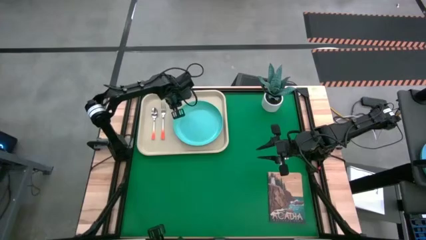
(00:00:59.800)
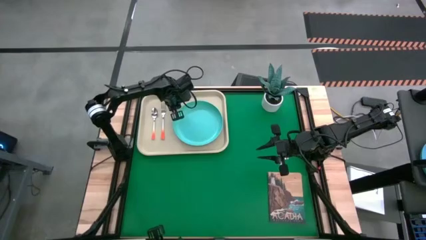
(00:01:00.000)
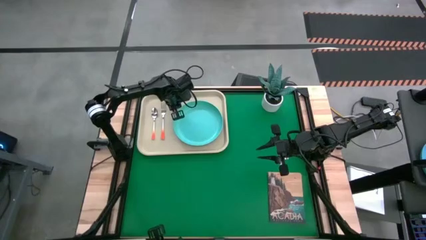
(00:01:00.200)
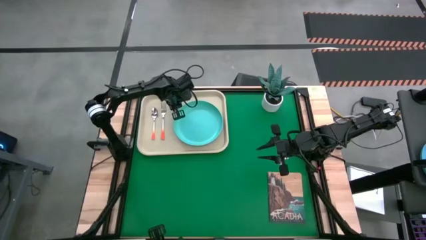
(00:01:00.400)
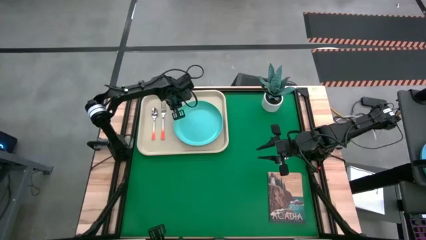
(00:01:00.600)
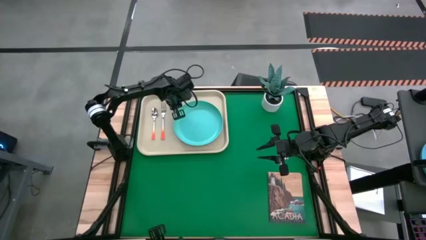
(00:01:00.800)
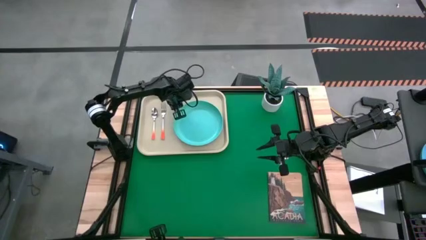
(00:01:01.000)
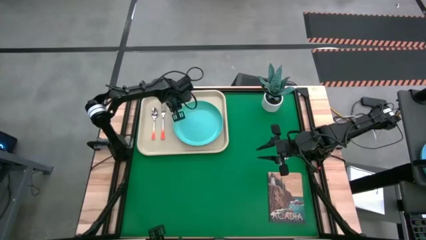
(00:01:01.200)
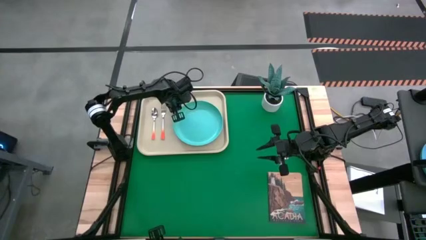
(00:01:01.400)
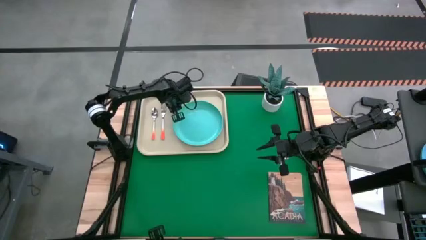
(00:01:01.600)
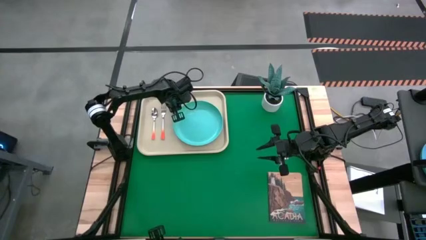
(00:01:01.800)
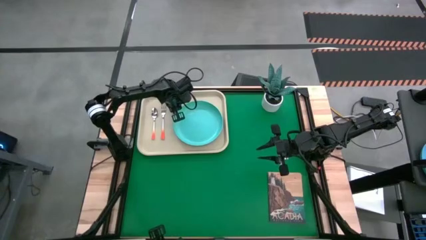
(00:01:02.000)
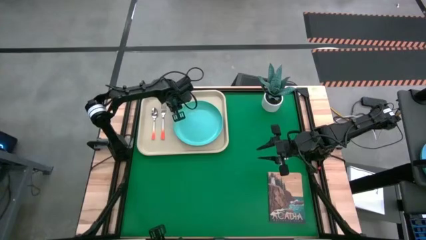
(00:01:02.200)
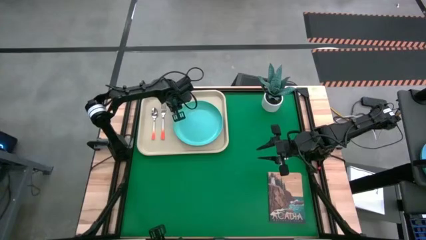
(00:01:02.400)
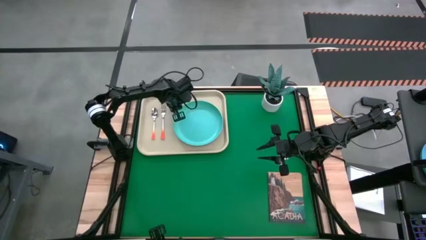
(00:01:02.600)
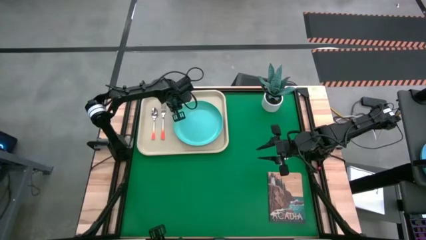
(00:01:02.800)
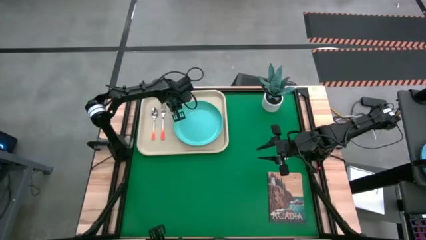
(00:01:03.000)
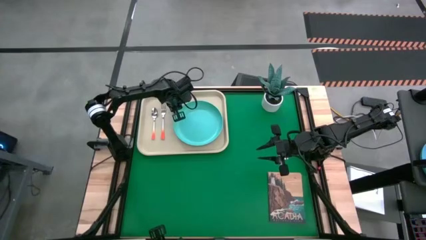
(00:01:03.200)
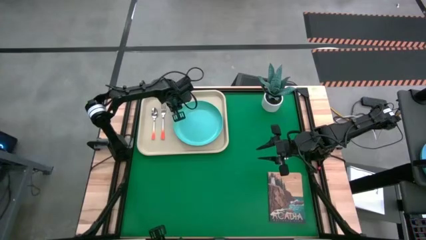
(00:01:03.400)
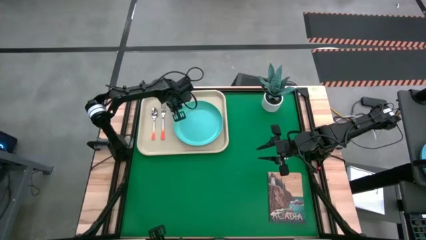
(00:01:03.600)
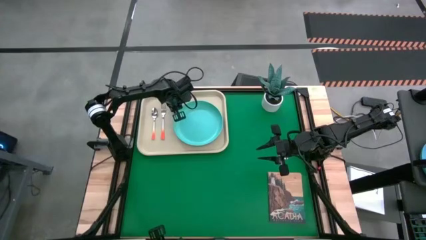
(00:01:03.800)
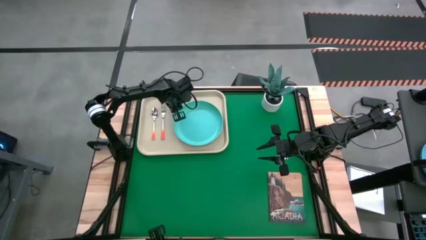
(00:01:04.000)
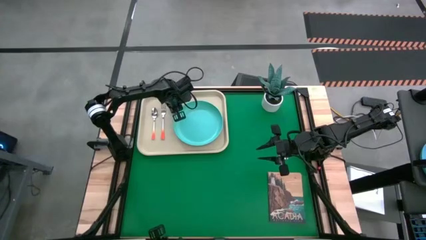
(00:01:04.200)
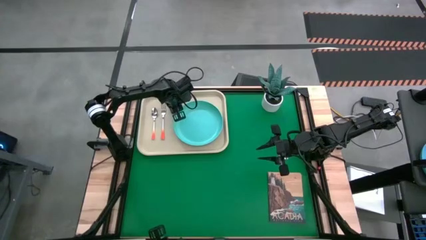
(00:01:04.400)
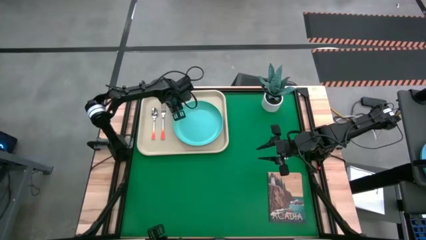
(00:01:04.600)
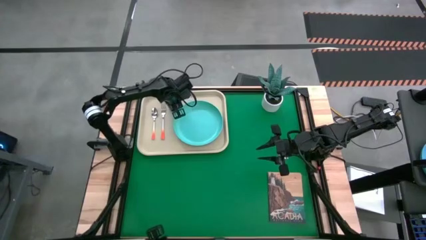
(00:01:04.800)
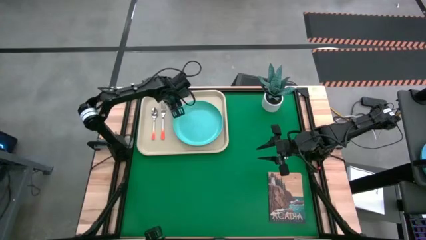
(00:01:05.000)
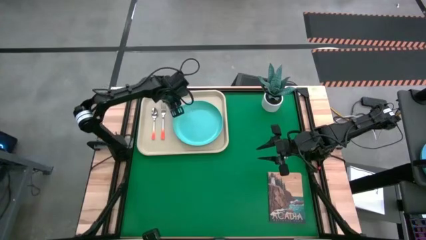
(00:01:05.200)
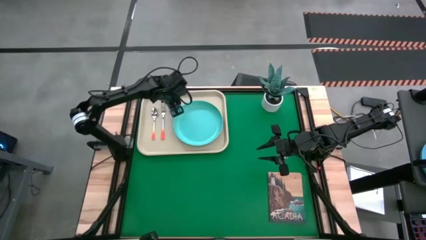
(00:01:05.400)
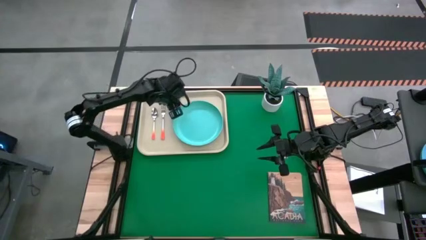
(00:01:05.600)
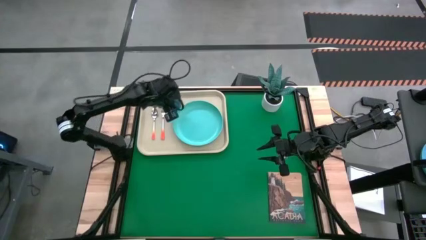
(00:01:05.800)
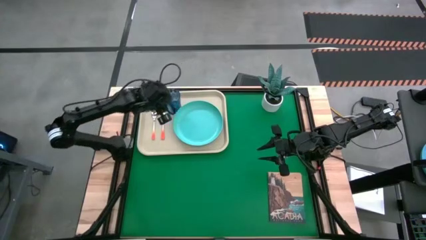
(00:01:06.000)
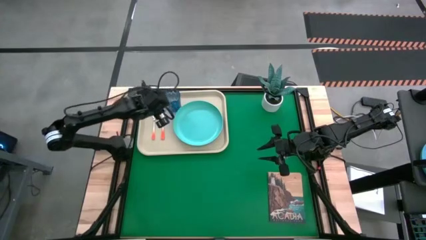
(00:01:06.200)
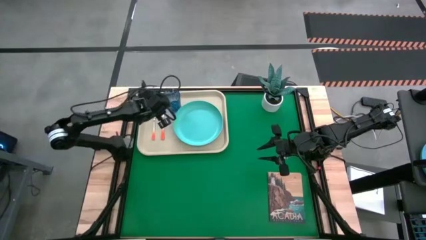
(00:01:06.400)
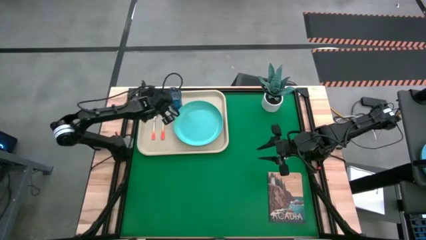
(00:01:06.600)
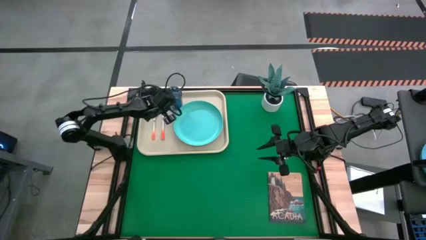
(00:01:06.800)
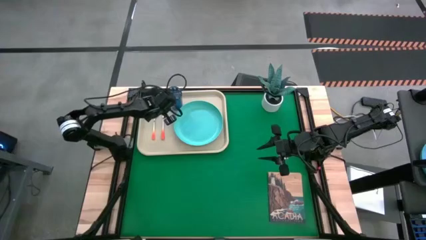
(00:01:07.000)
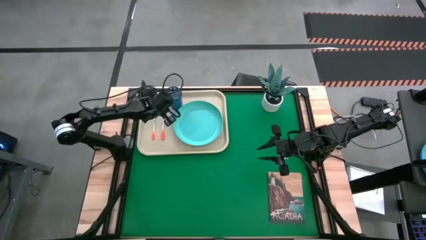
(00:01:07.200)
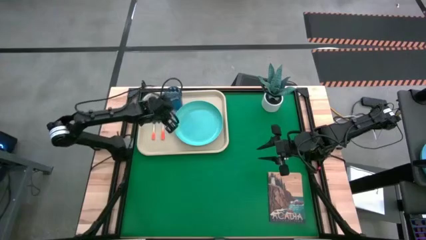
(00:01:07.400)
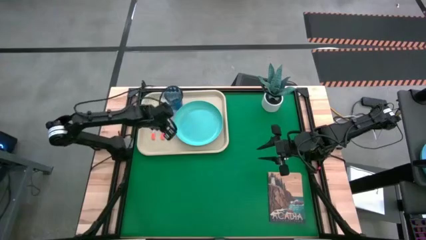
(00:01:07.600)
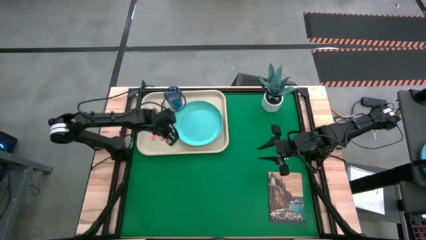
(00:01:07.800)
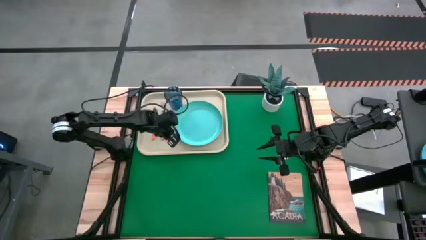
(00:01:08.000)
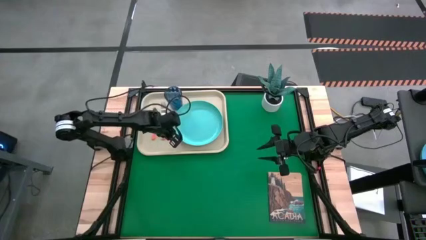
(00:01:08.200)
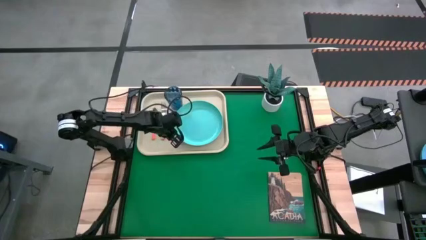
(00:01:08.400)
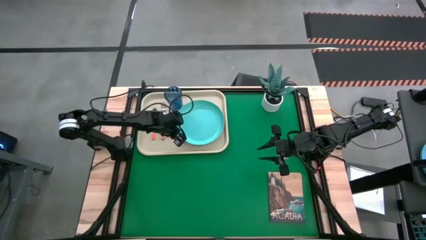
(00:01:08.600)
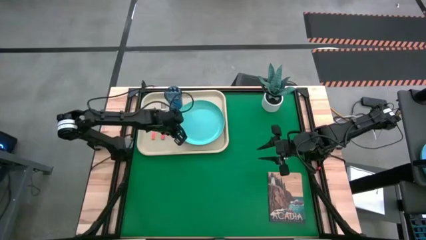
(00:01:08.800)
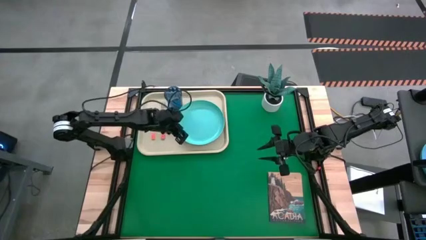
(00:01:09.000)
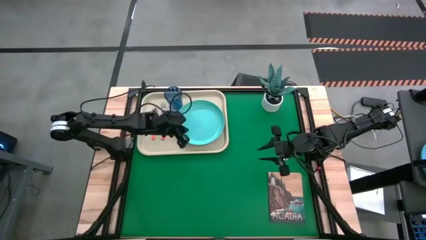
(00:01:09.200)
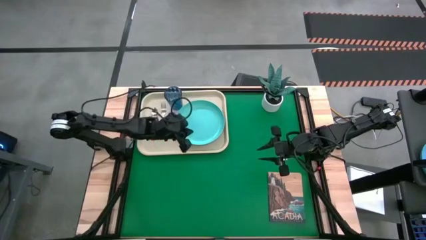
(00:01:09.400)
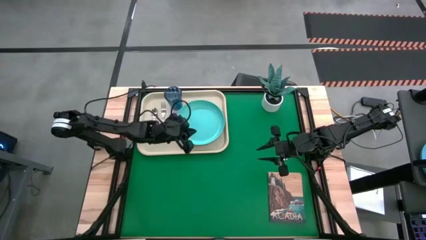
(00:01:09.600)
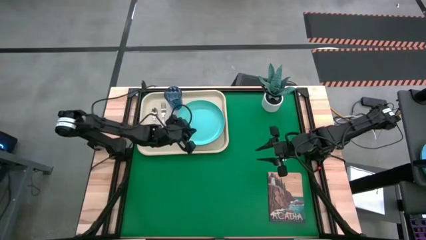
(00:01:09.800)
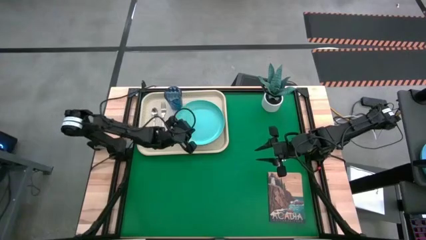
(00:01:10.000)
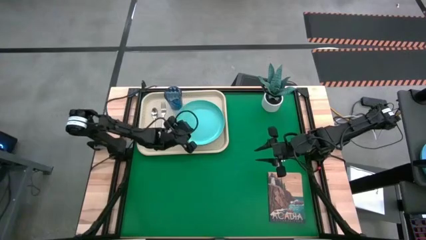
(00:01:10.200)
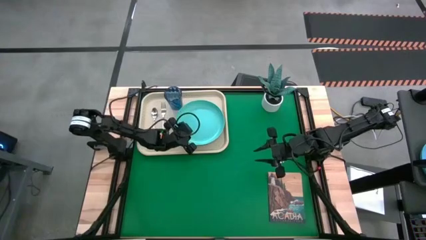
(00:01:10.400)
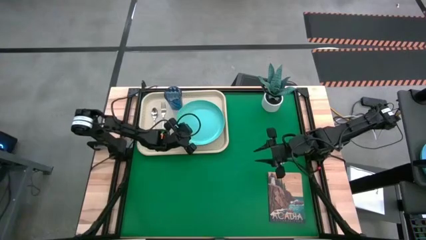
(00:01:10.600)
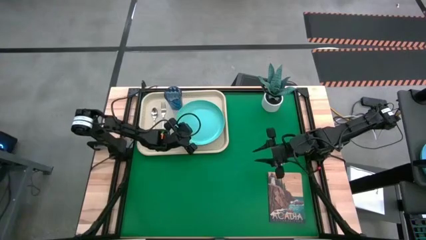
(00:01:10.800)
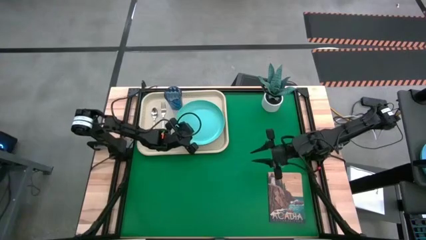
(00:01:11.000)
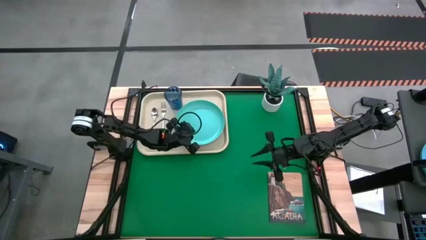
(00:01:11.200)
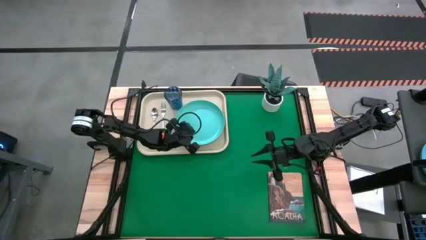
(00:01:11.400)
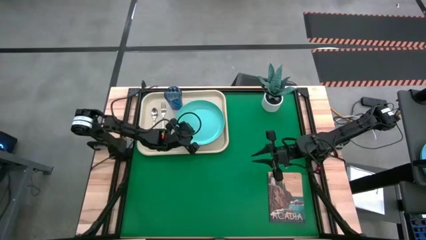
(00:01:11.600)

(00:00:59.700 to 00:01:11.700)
Task: Pick and place plate/cup/fork/spoon on tray
Put the blue cup on the white tray to the top left of the blue plate

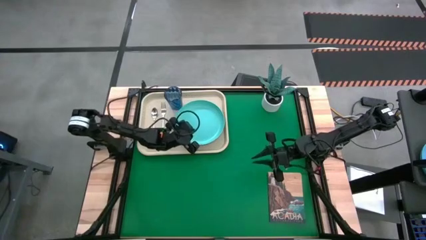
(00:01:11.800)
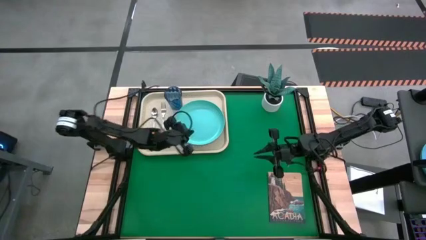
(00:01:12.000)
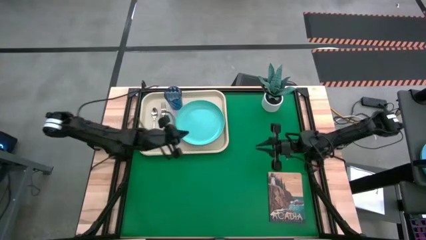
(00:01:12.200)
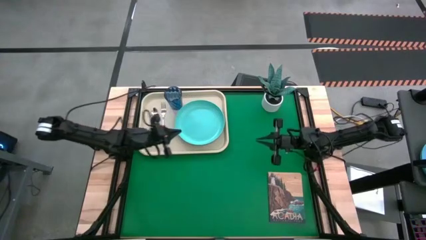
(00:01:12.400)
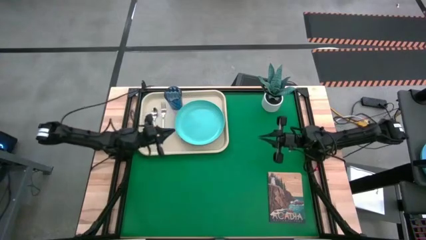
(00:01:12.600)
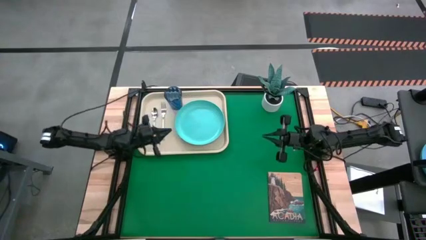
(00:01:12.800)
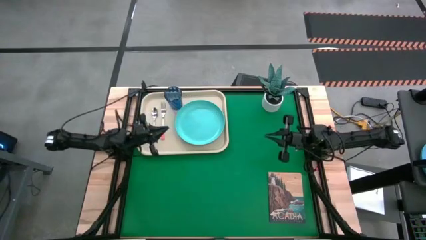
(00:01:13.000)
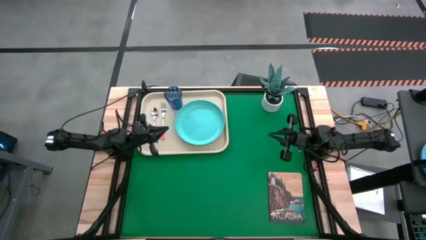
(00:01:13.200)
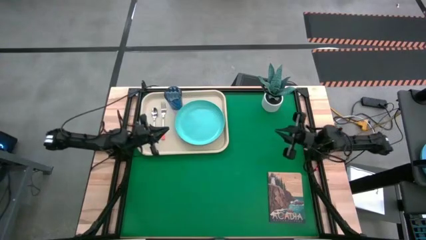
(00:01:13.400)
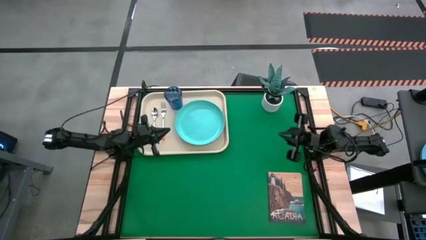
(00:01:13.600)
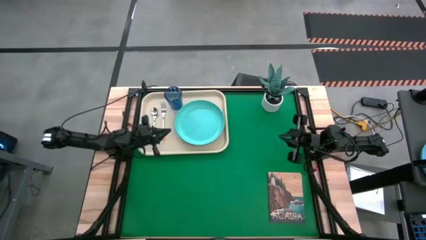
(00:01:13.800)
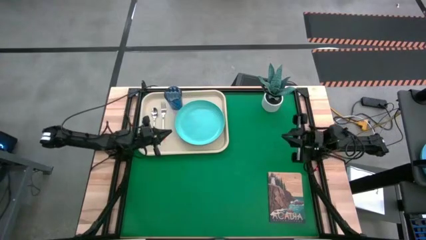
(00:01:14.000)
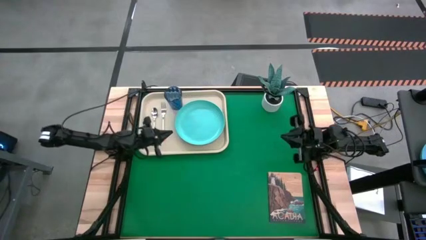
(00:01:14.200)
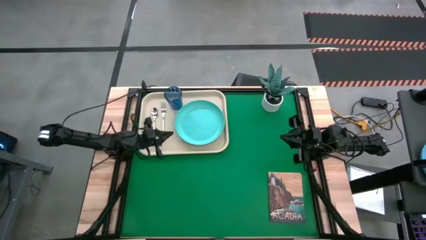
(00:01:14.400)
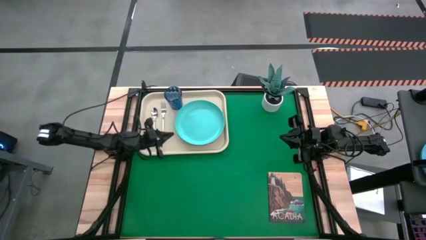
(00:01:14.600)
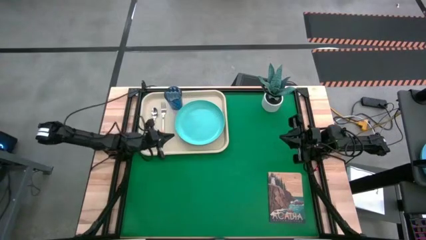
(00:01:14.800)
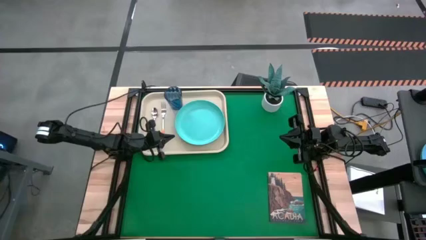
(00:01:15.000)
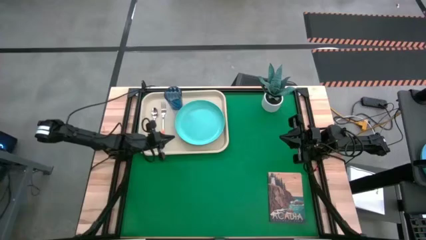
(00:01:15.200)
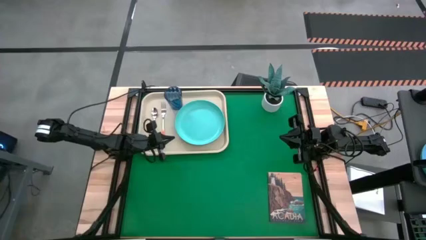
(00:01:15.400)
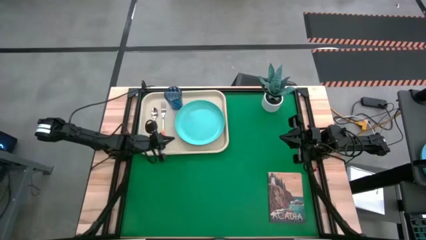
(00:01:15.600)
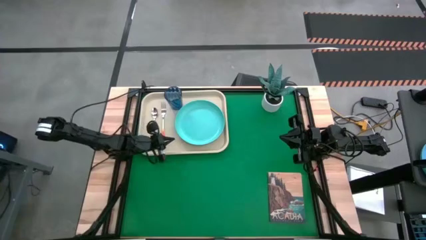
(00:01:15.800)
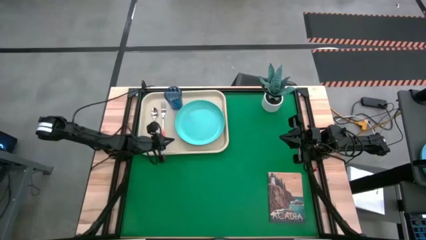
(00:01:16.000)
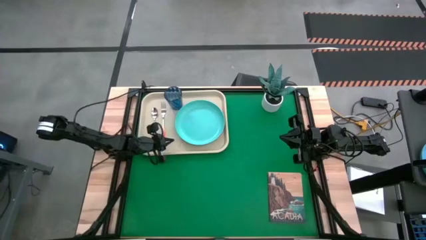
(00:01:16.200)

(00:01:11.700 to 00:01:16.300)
Return to Home Position
